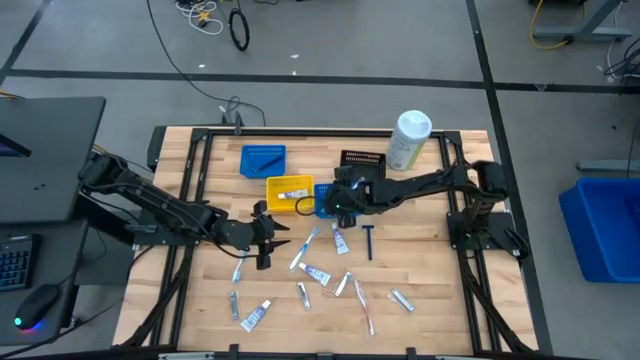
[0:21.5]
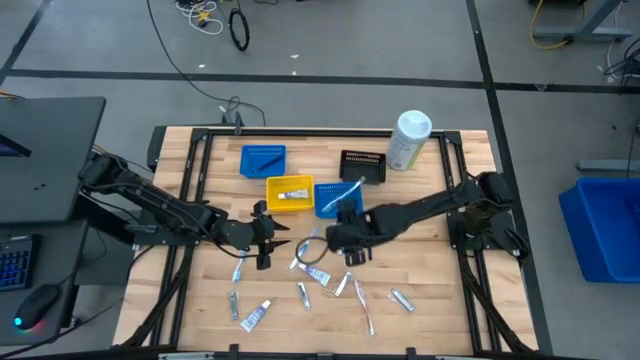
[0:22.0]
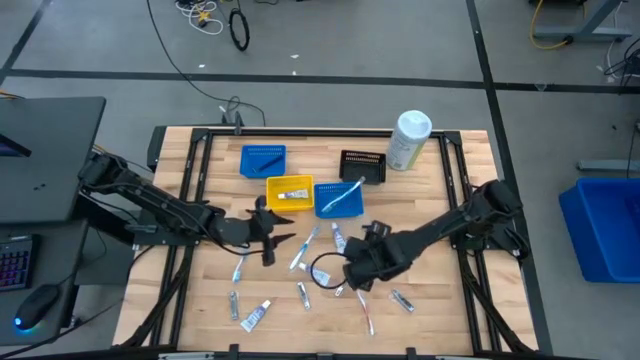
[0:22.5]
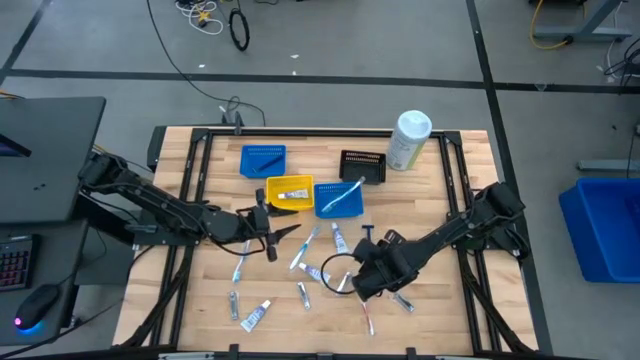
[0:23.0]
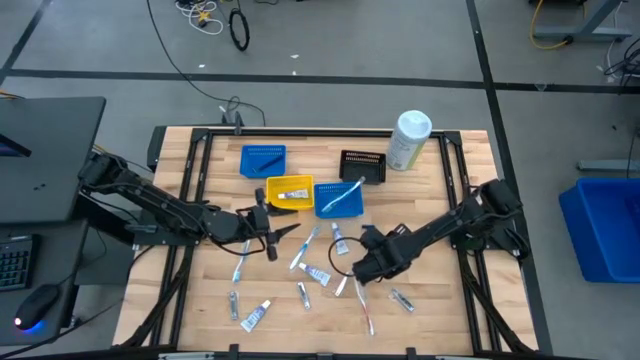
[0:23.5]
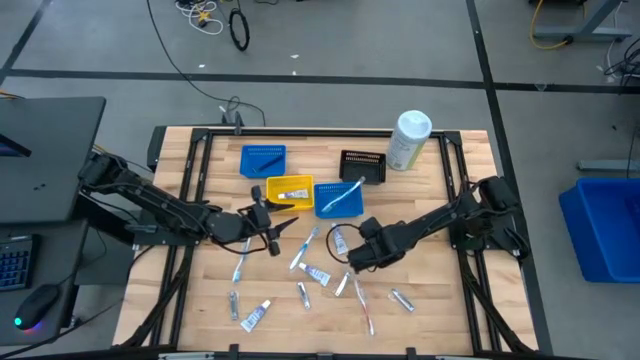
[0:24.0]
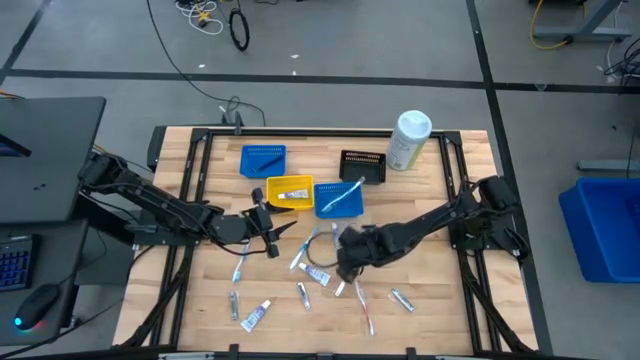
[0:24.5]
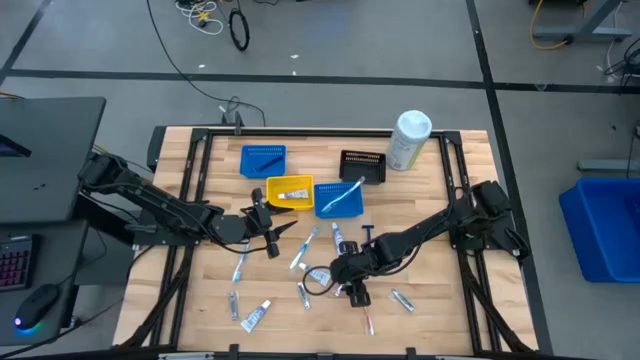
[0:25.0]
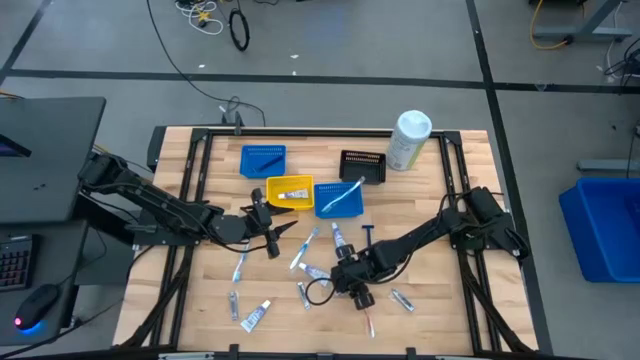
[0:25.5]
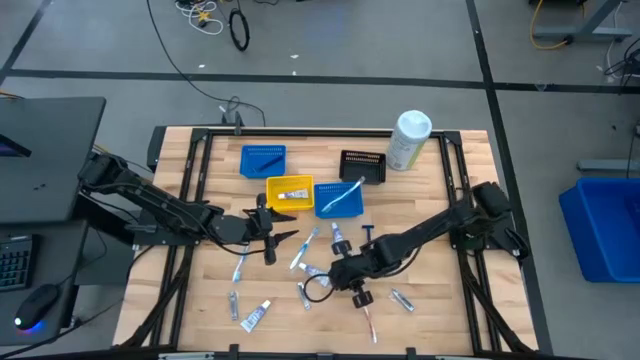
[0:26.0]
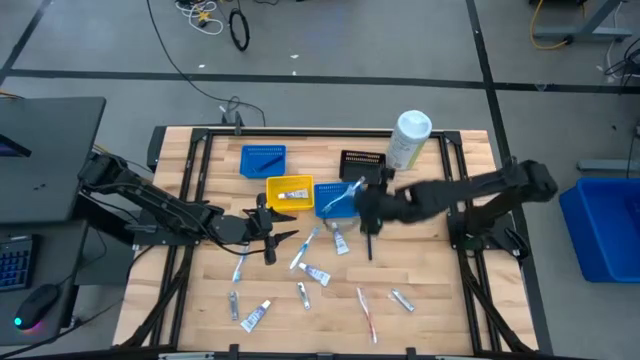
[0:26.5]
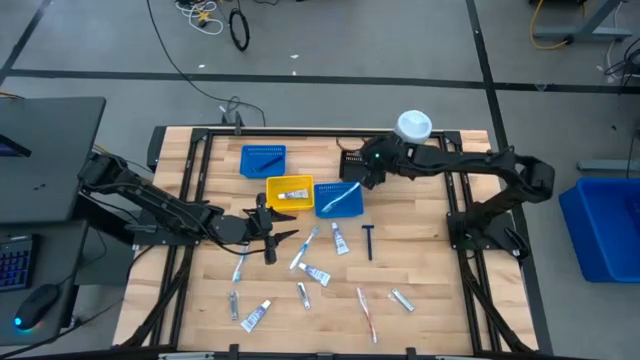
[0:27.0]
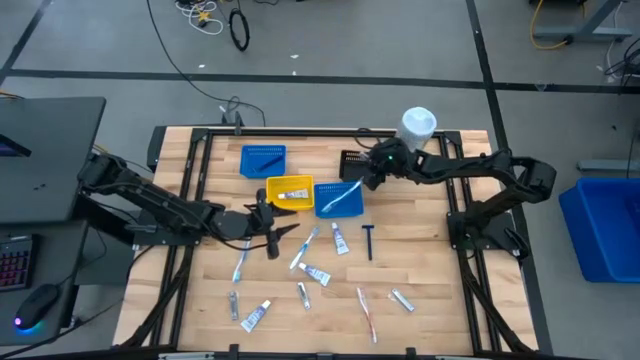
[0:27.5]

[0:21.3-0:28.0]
Task: Pick & Place Travel size toiletries
Put the nail cutter into the black basket

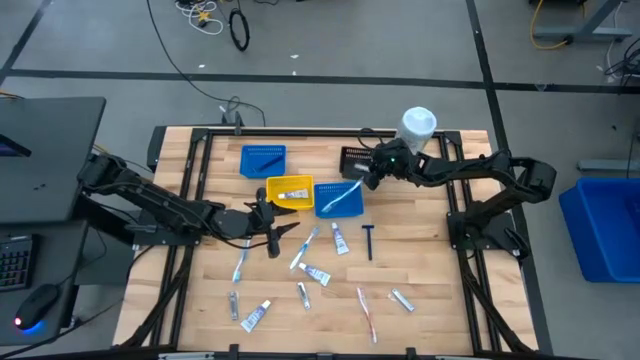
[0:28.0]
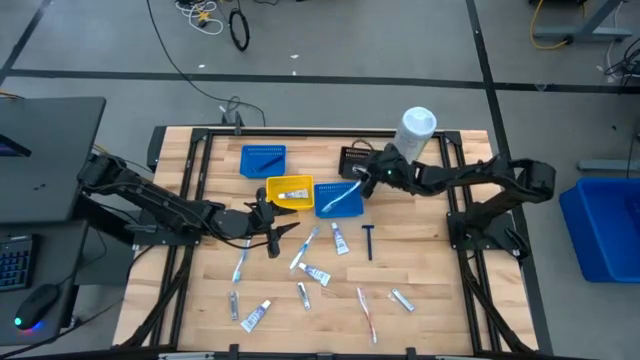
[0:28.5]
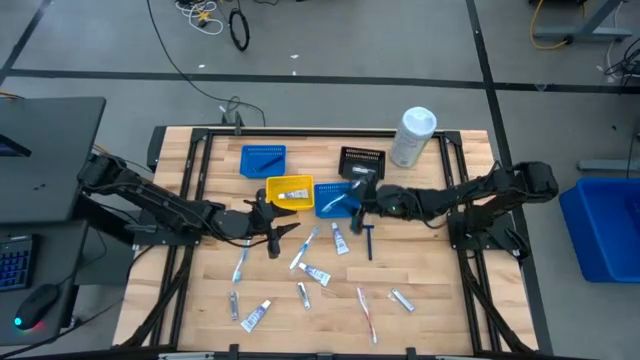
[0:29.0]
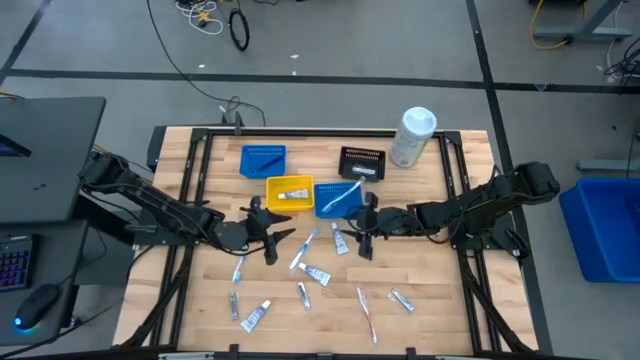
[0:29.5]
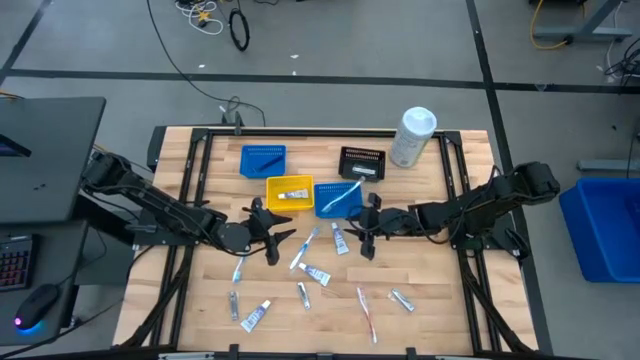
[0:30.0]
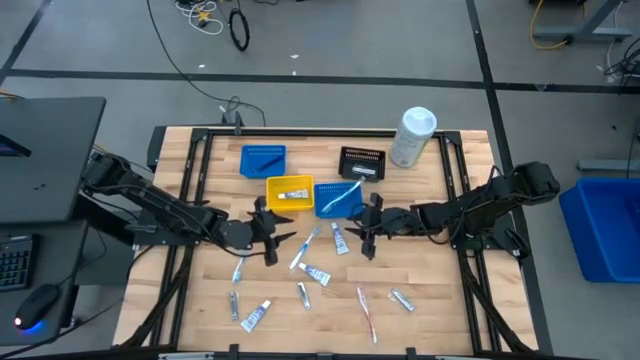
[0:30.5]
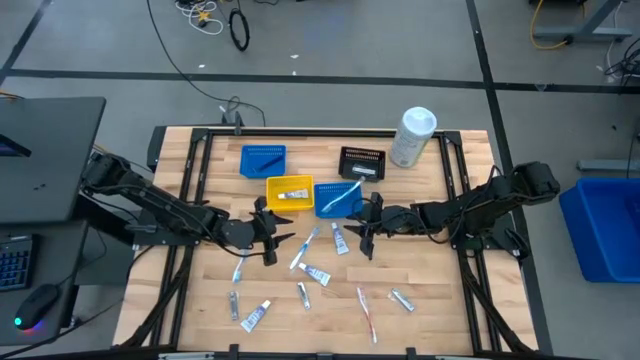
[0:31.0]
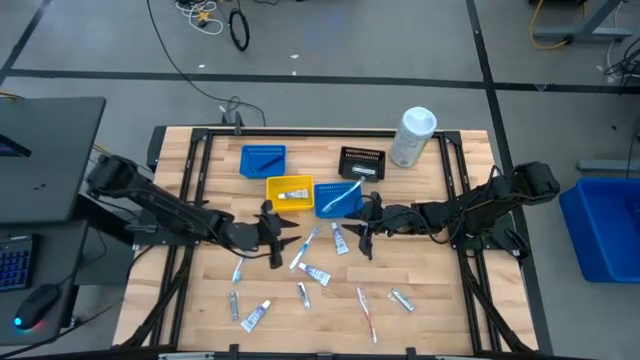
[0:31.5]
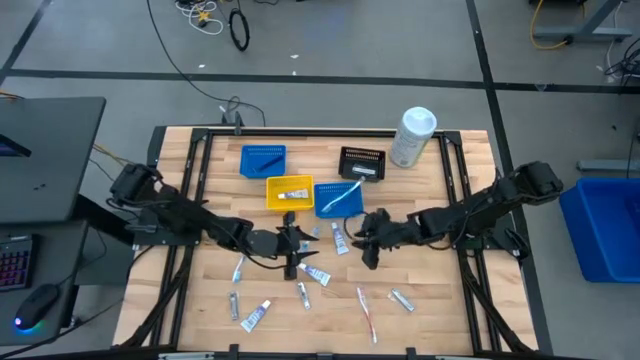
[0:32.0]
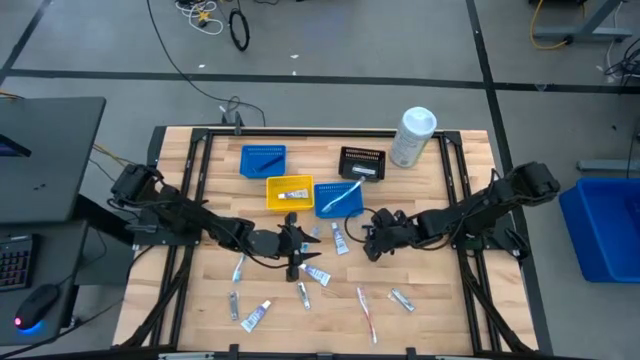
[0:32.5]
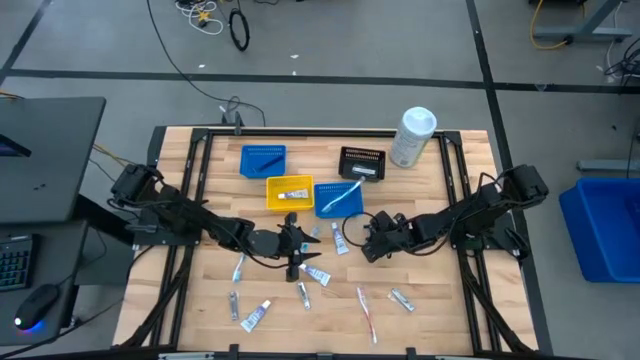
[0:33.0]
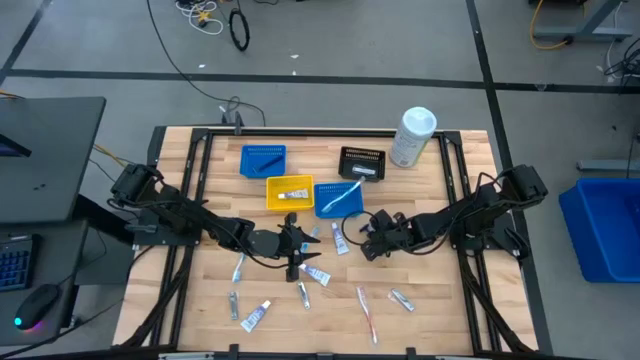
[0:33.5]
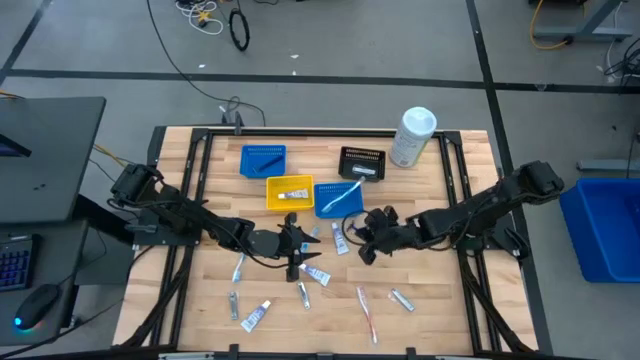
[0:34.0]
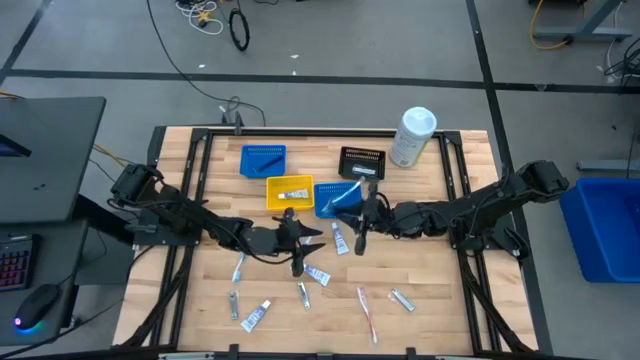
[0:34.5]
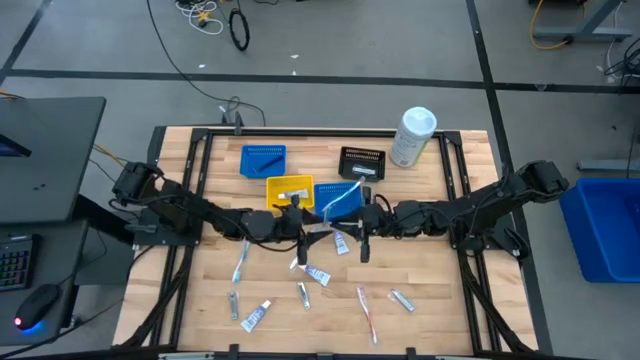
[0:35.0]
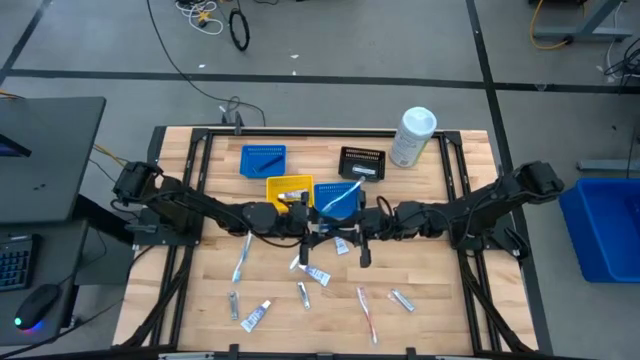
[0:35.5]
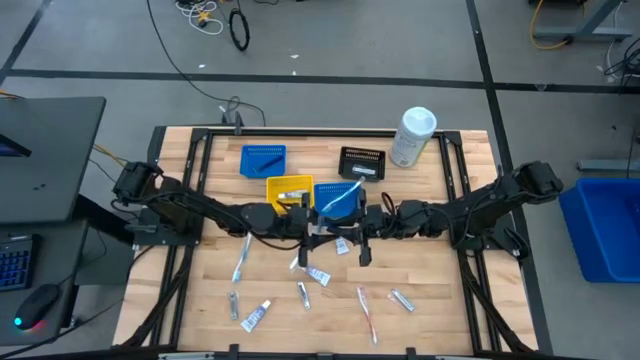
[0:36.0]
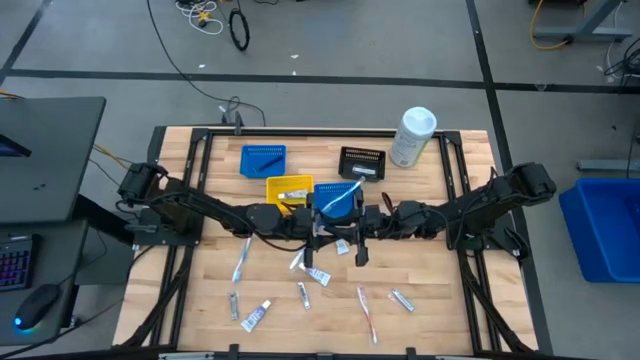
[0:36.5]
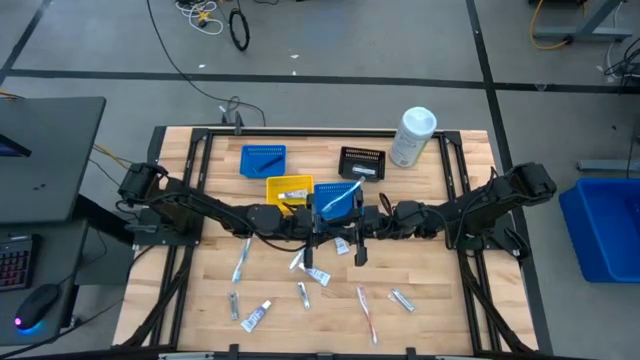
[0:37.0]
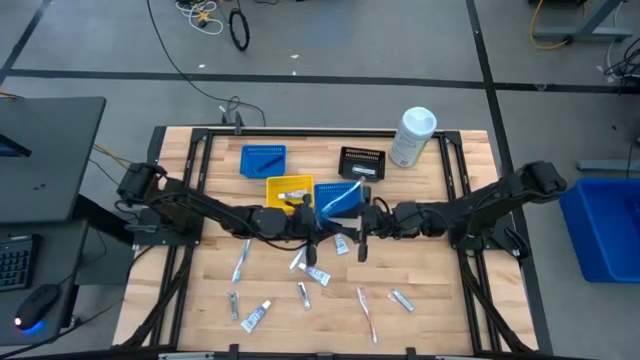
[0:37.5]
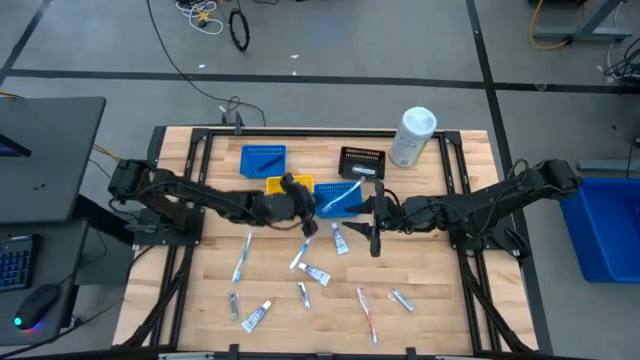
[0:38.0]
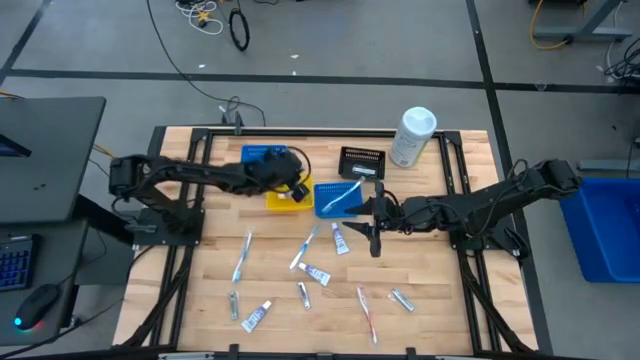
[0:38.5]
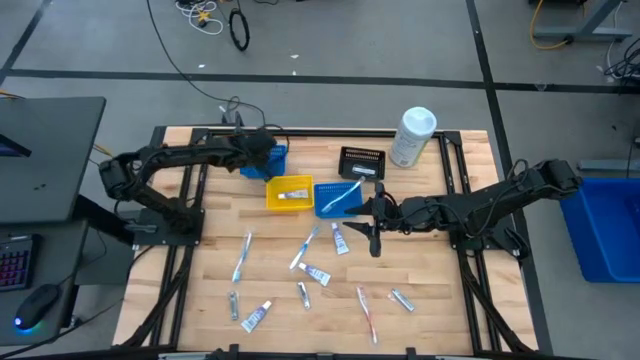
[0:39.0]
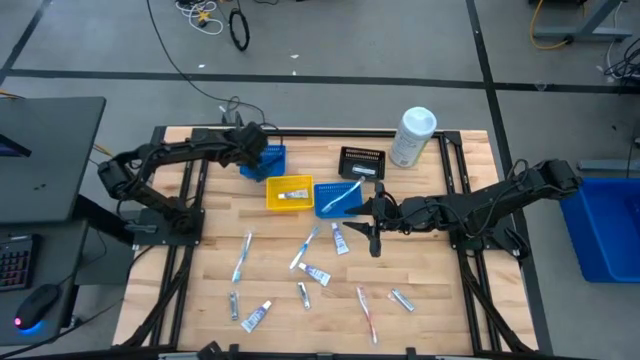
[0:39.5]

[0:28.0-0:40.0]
Put the razor into the left blue basket

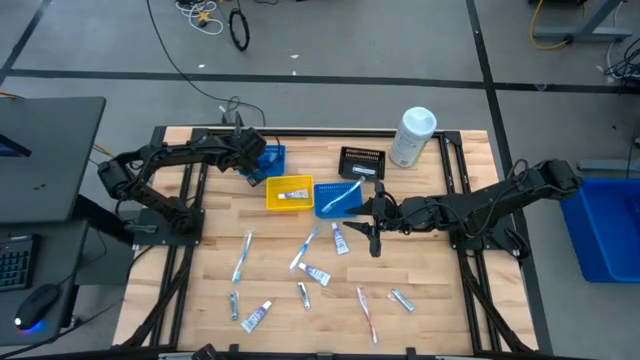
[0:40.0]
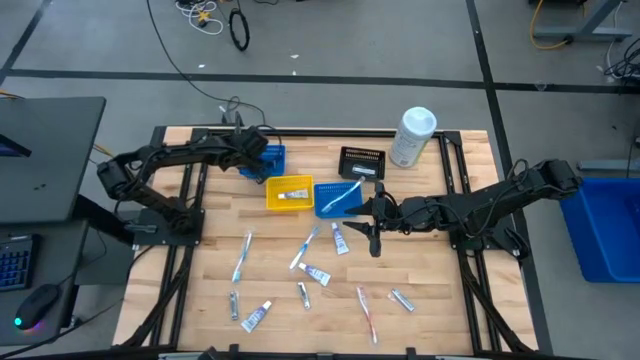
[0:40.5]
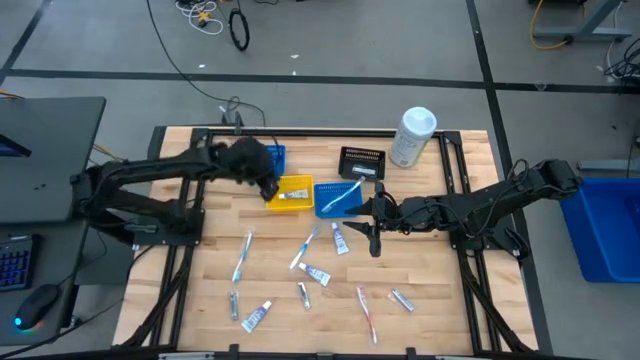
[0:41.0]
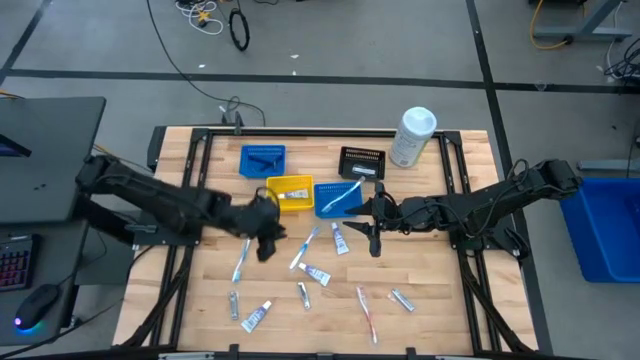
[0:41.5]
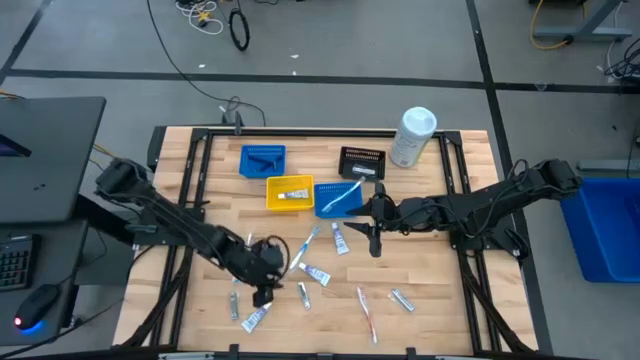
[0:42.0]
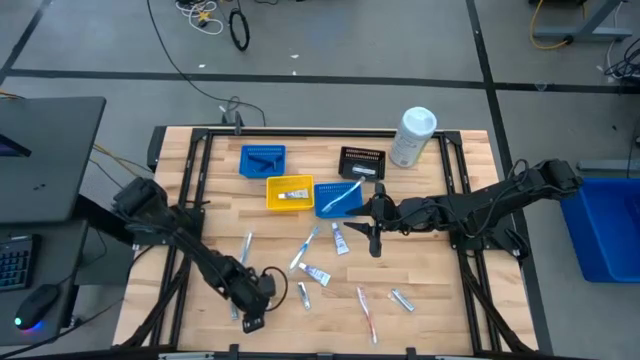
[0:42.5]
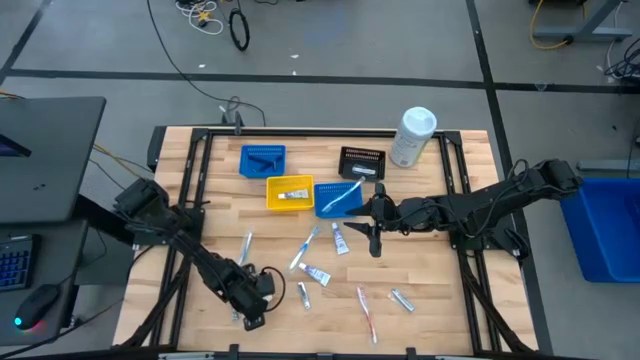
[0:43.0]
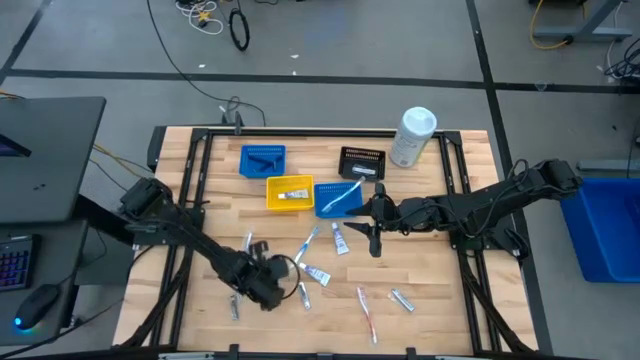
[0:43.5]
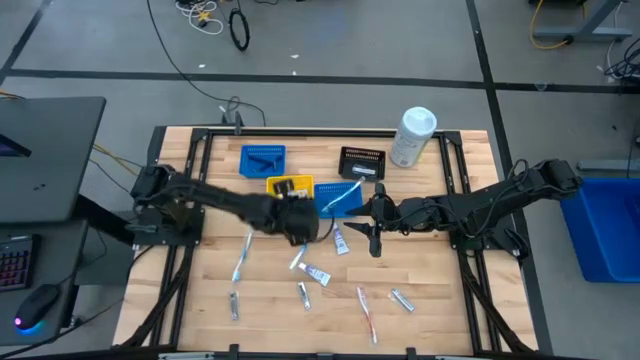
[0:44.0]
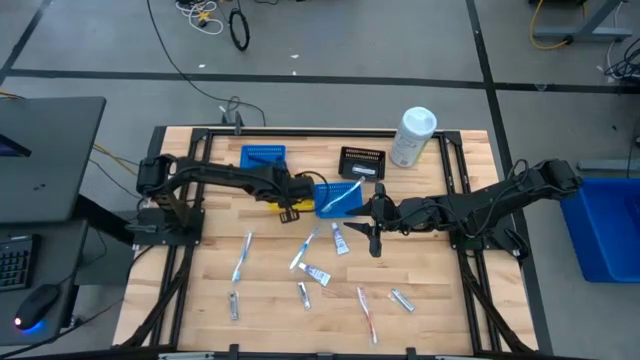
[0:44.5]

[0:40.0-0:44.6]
Put the toothpaste into the yellow basket
